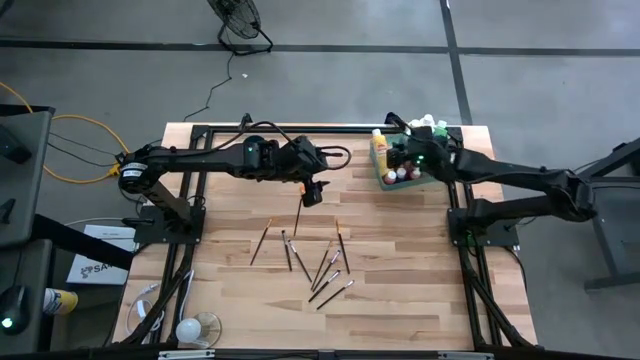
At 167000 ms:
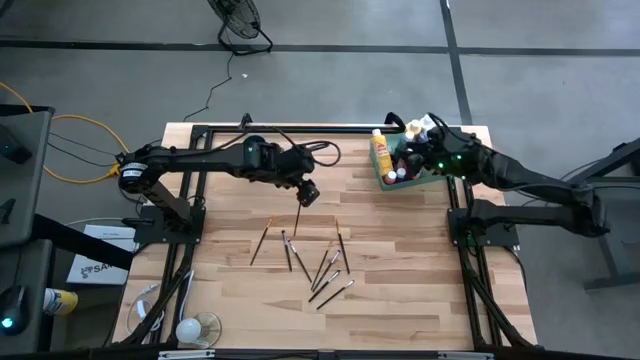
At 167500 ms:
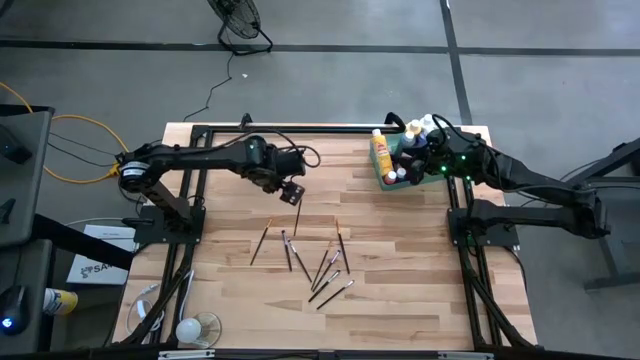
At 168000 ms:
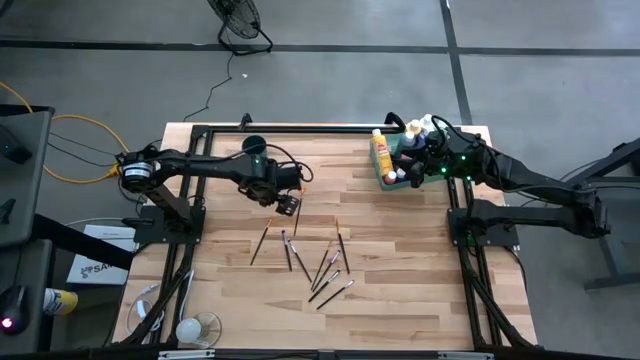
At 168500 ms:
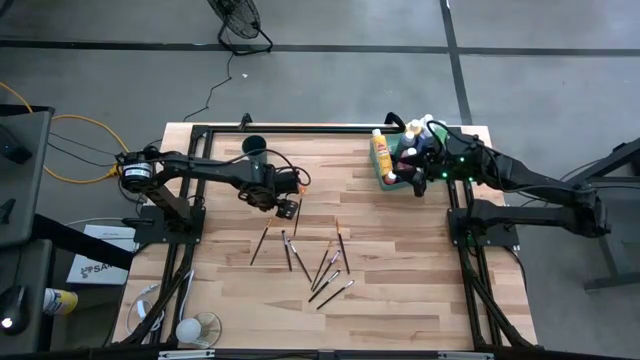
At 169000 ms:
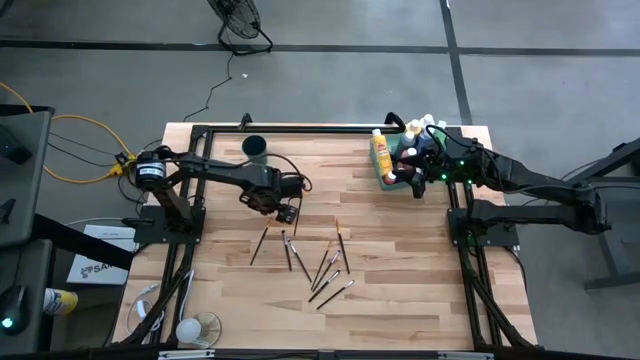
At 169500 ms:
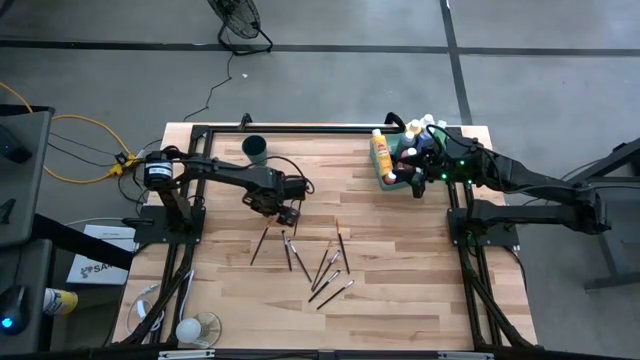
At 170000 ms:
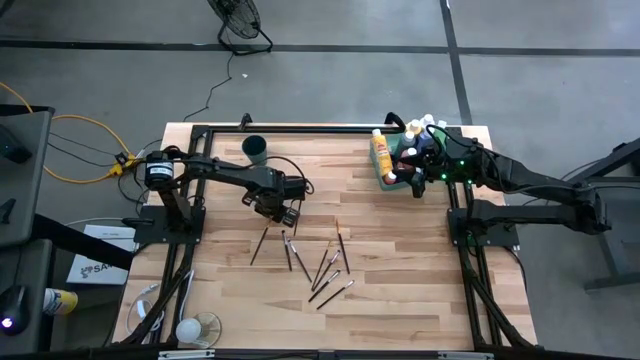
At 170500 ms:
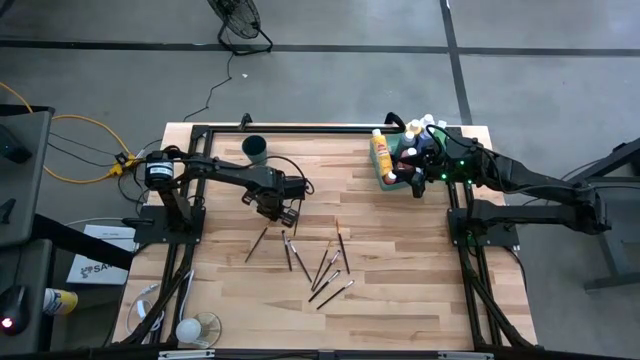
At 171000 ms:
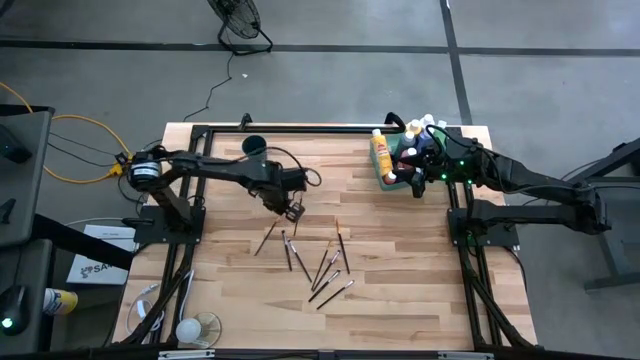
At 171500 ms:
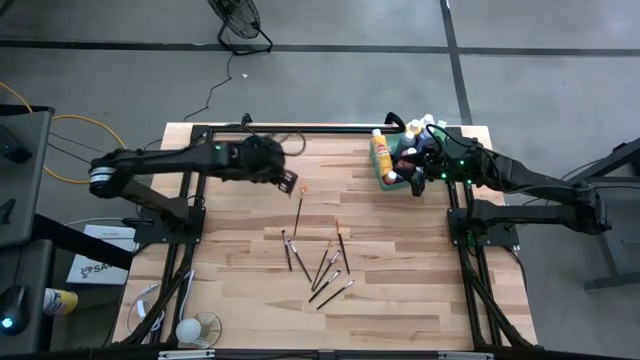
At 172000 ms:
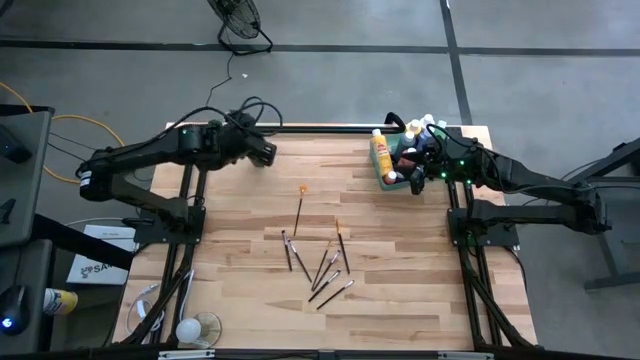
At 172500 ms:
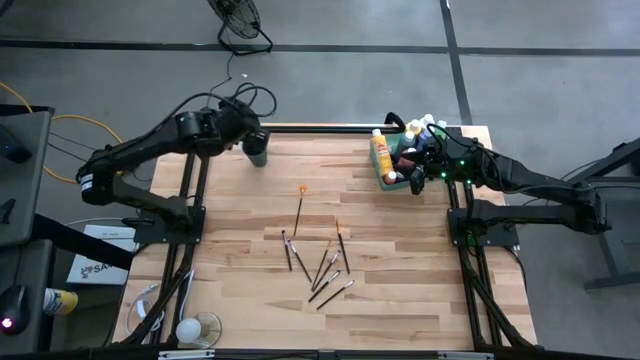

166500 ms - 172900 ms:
Task: Pick & Place Paint Supplies
Put the gold paintbrush into the blue cup

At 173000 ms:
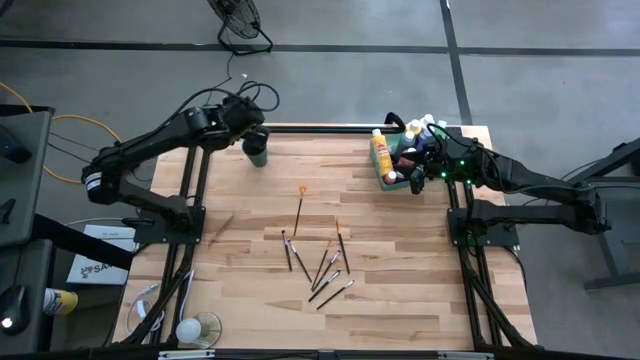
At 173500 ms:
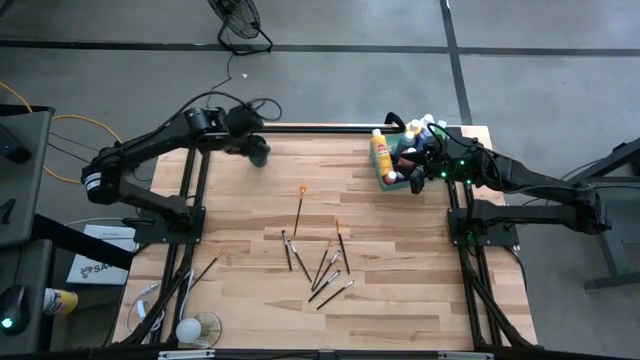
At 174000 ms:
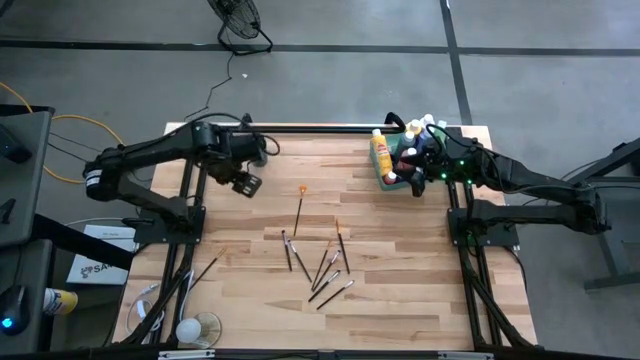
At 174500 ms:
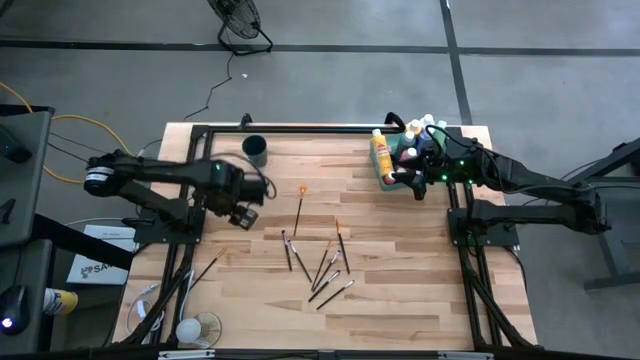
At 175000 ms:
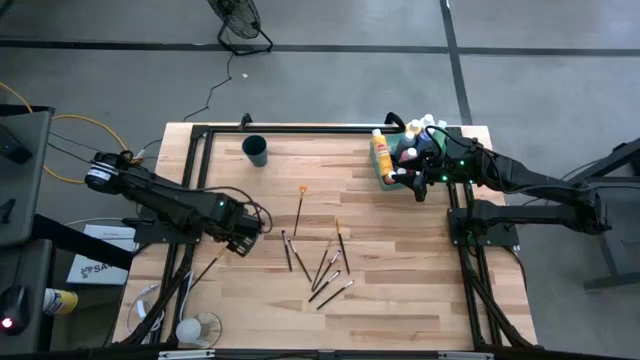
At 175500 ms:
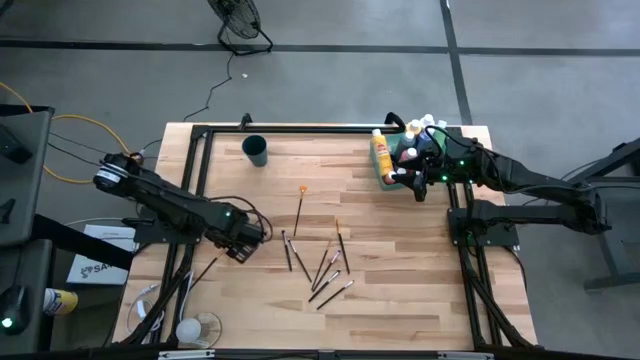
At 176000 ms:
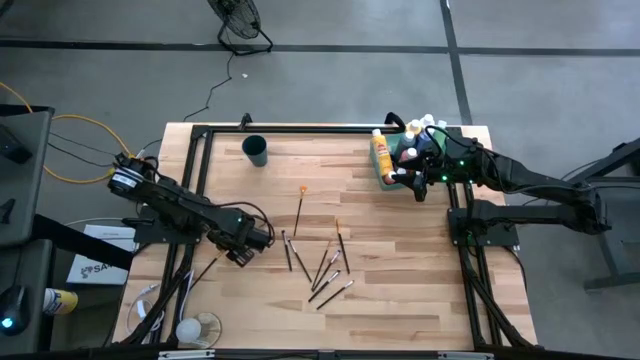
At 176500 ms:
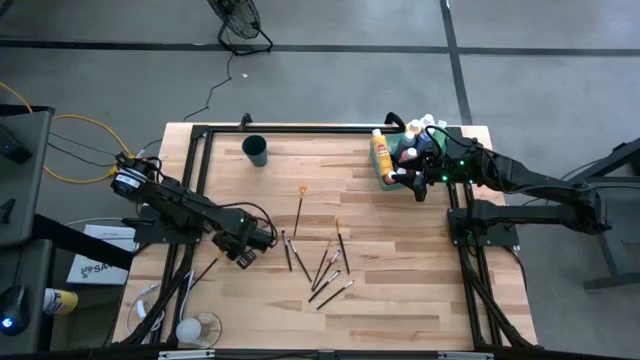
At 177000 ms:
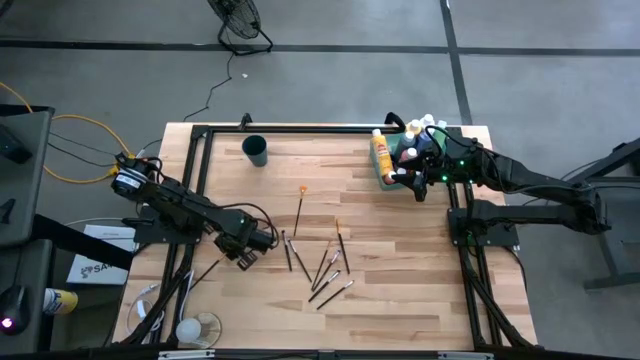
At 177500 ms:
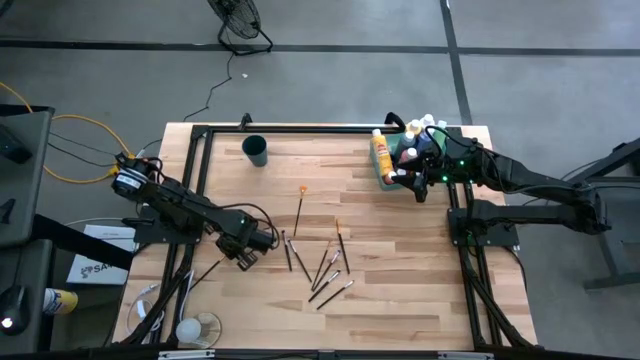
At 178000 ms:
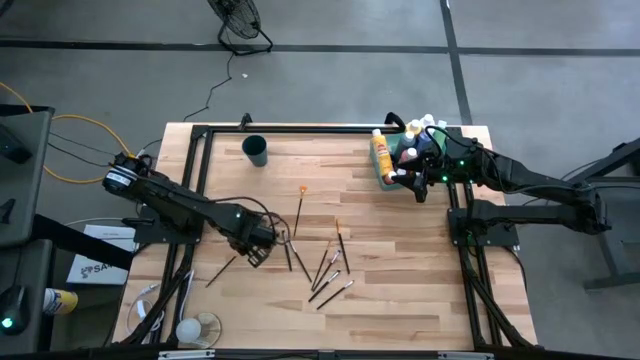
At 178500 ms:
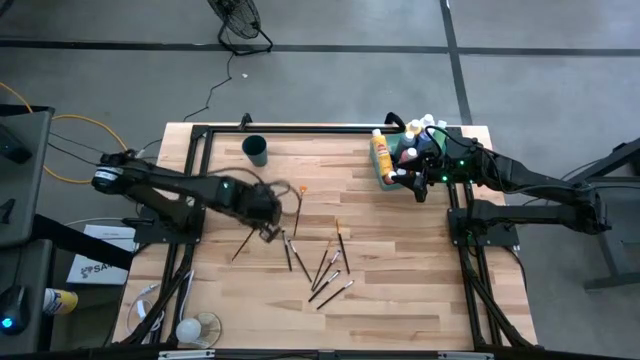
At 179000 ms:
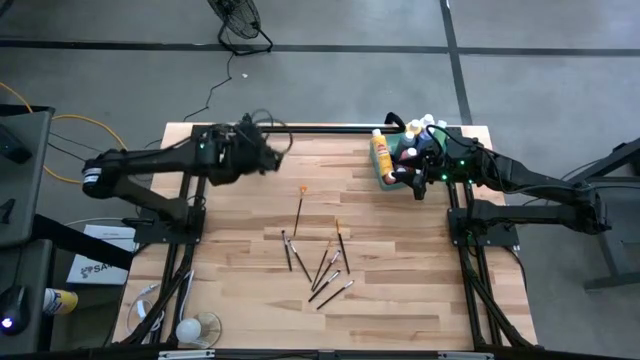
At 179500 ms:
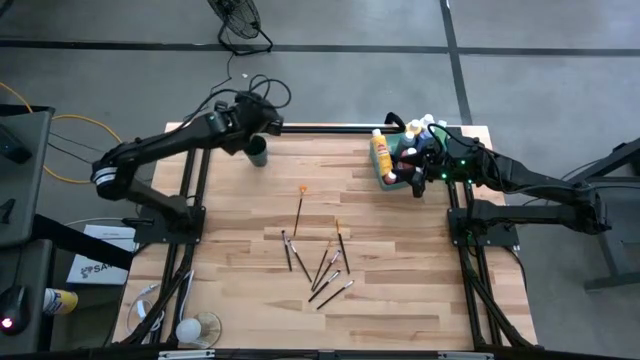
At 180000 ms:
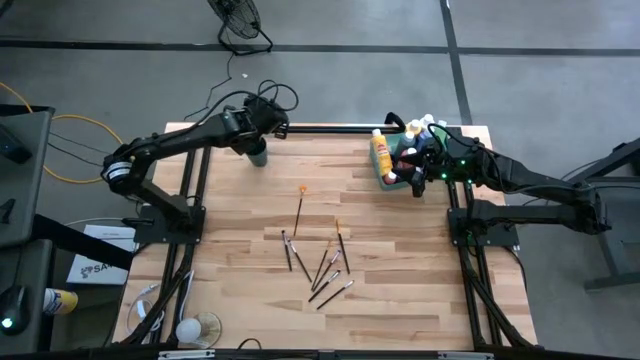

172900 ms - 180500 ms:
Put the gold paintbrush into the blue cup

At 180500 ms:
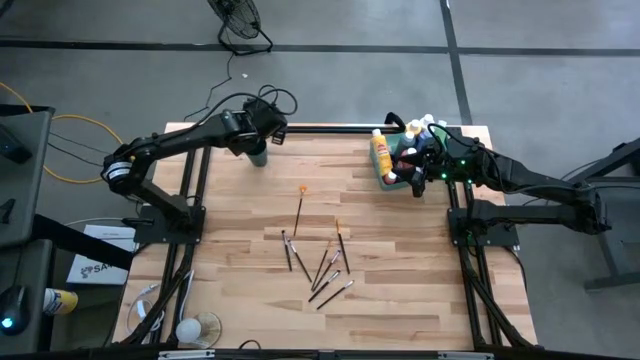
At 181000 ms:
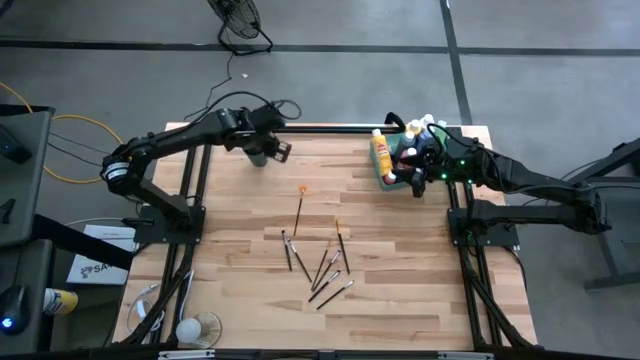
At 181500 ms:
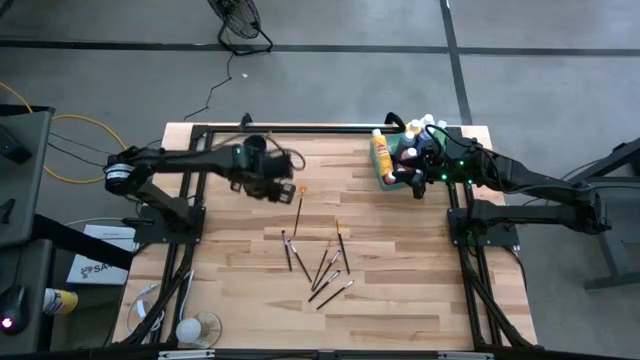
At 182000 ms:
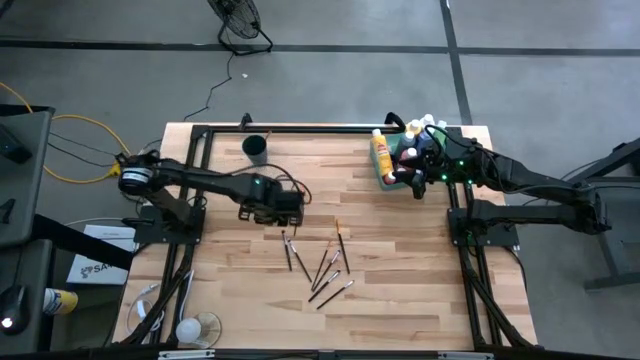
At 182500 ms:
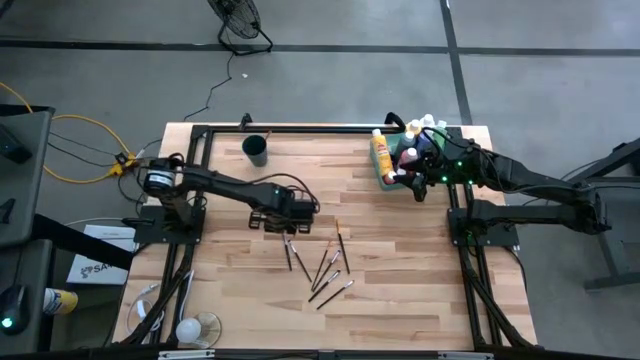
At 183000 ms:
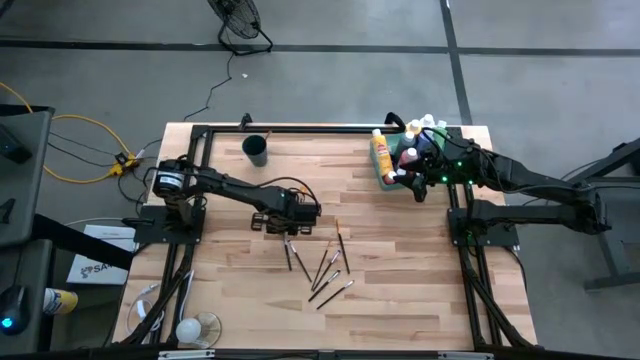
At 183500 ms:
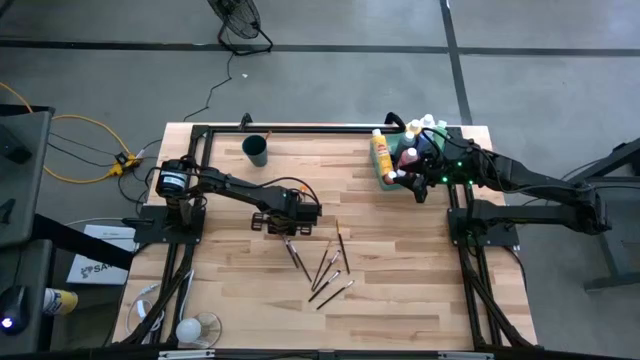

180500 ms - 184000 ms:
Put the silver paintbrush into the blue cup

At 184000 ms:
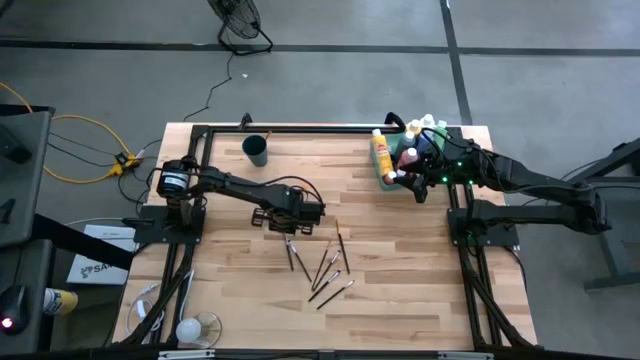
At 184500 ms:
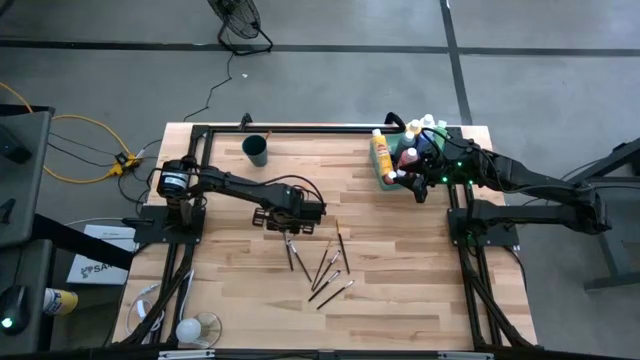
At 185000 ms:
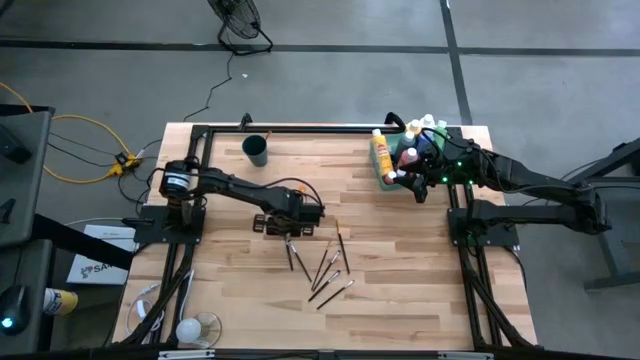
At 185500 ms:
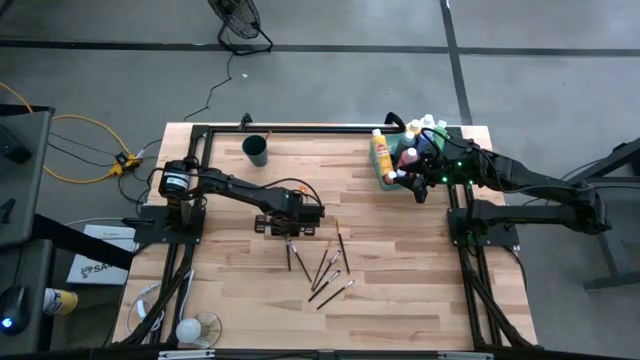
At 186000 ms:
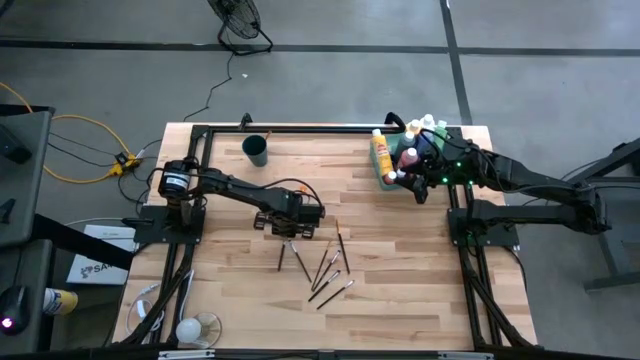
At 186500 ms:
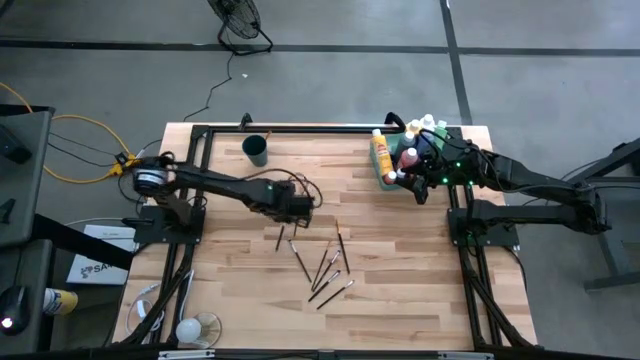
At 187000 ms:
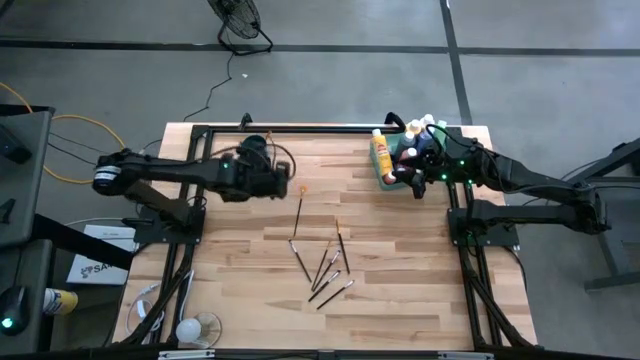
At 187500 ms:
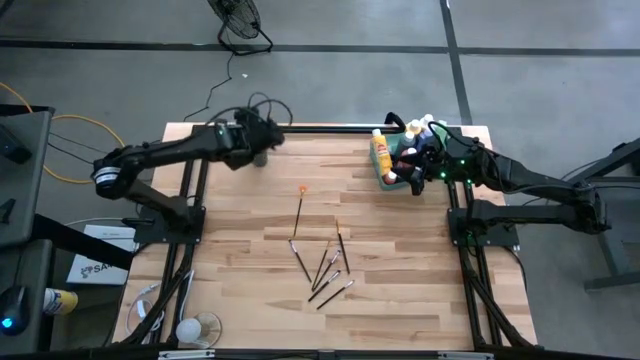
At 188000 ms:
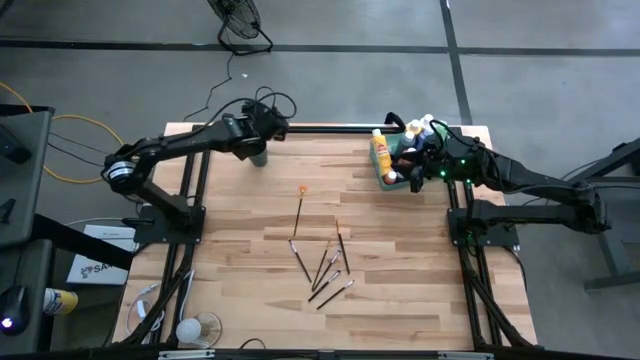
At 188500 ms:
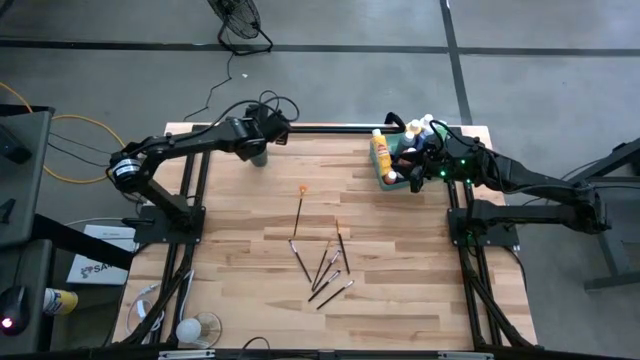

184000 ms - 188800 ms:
Put the silver paintbrush into the blue cup
